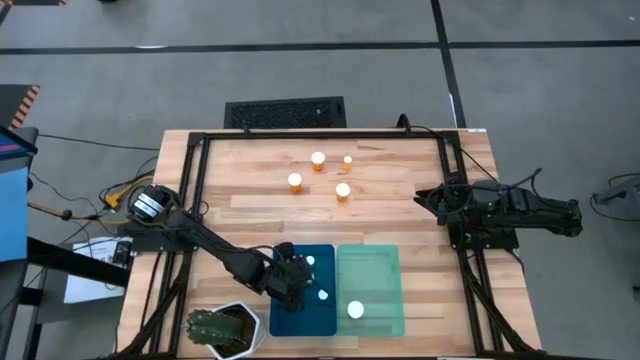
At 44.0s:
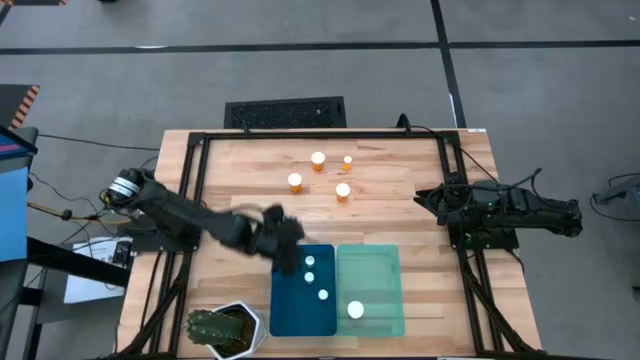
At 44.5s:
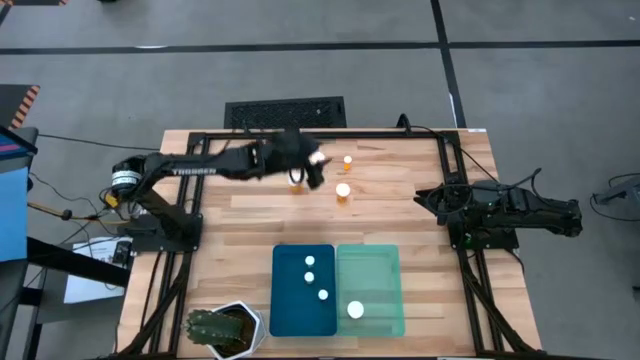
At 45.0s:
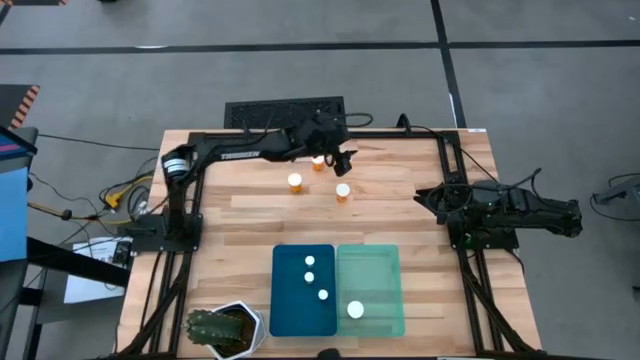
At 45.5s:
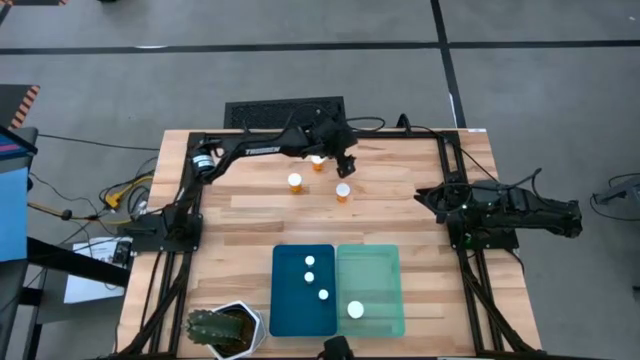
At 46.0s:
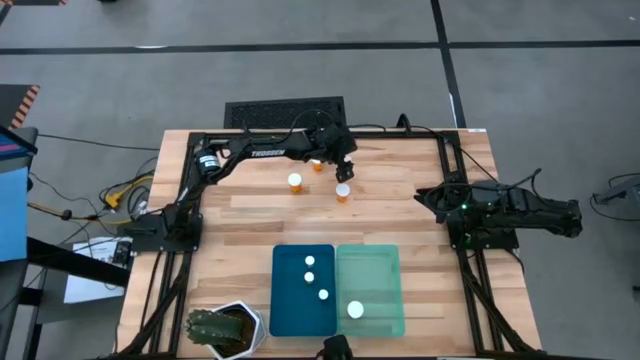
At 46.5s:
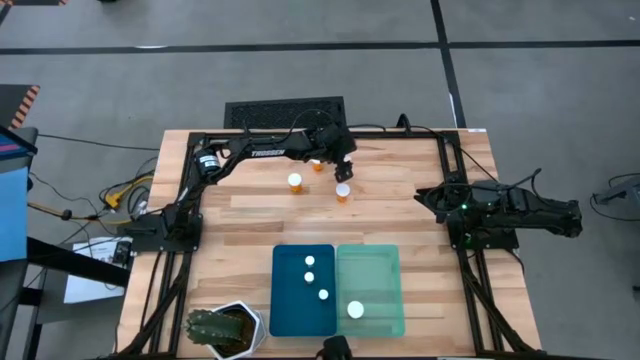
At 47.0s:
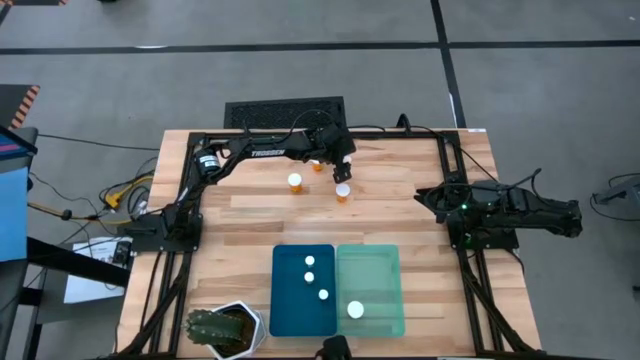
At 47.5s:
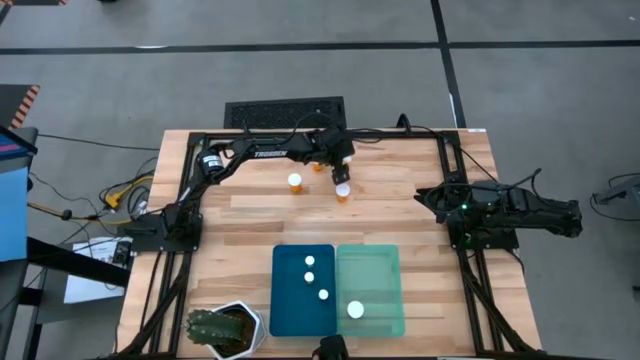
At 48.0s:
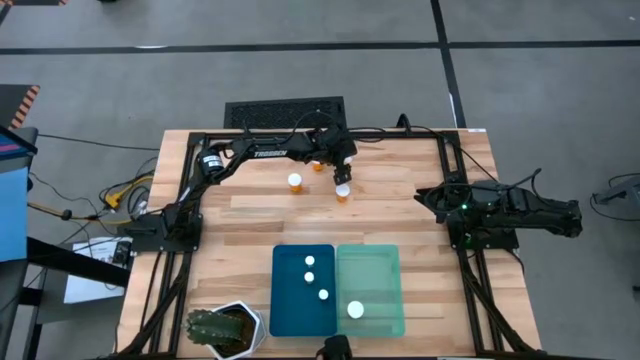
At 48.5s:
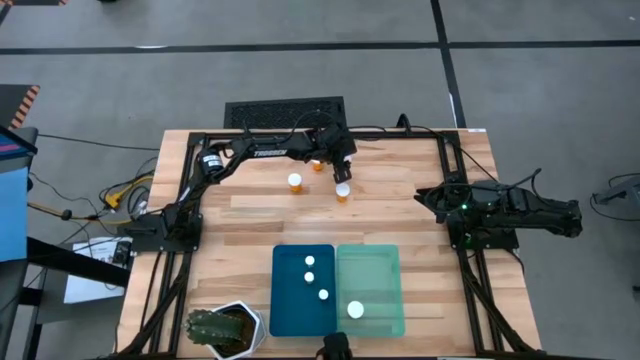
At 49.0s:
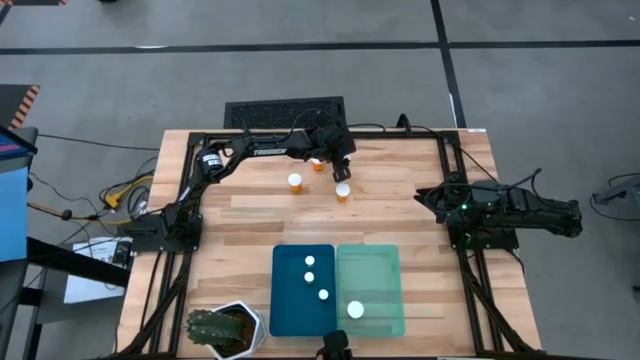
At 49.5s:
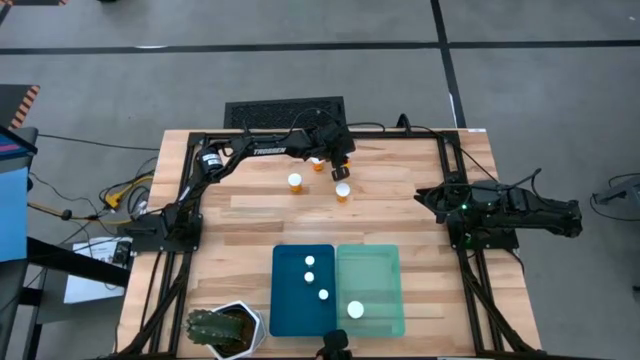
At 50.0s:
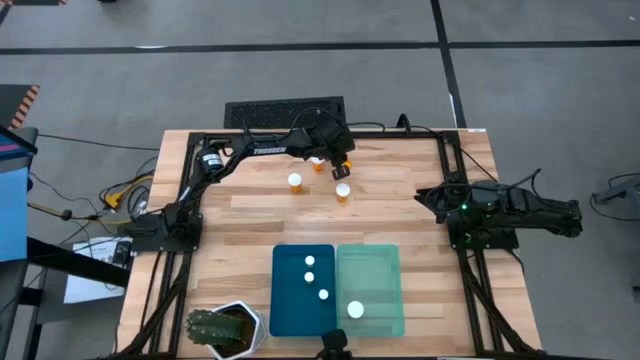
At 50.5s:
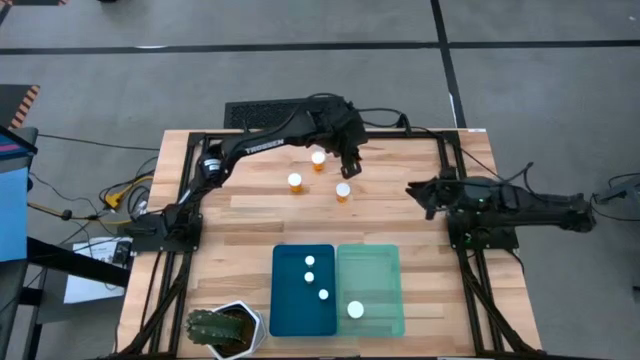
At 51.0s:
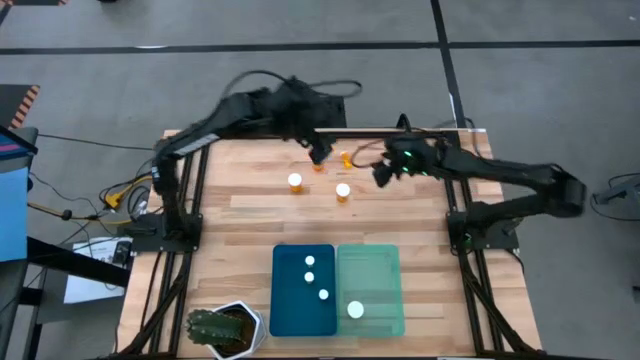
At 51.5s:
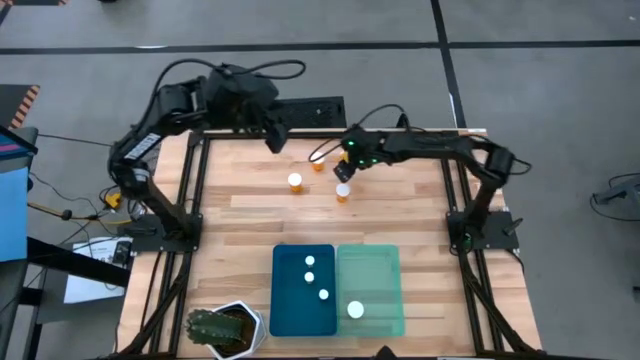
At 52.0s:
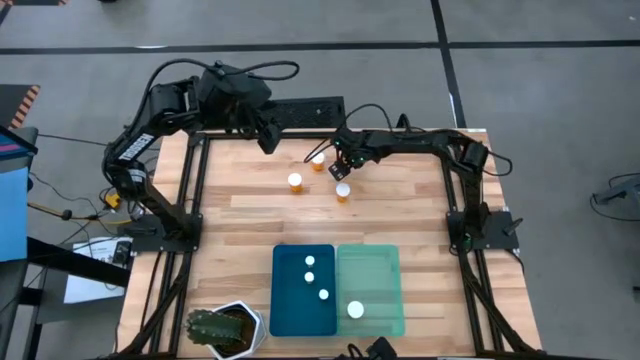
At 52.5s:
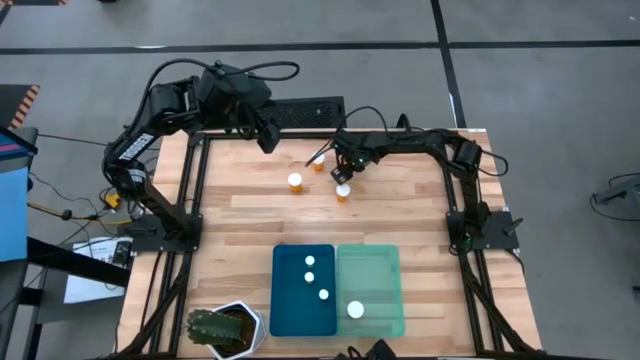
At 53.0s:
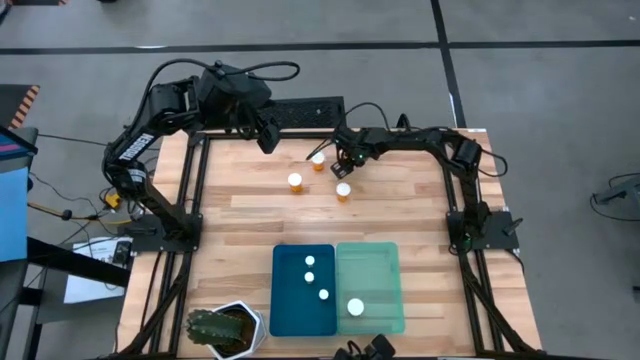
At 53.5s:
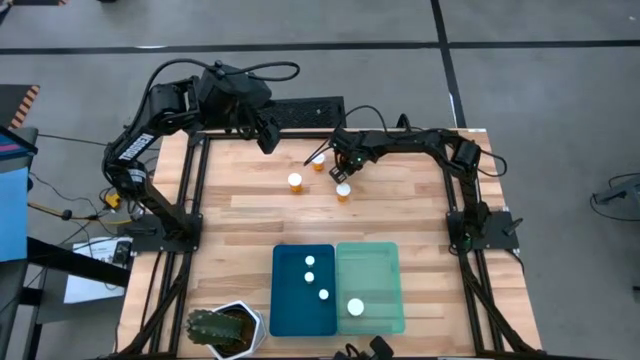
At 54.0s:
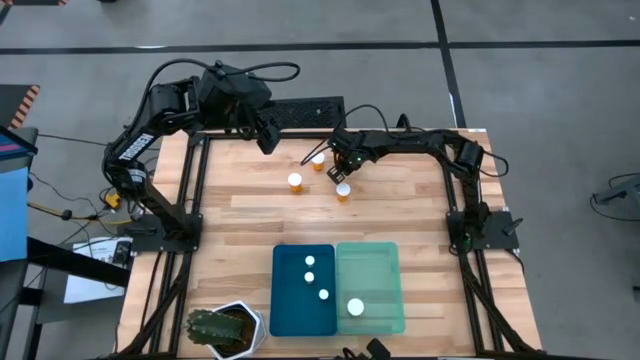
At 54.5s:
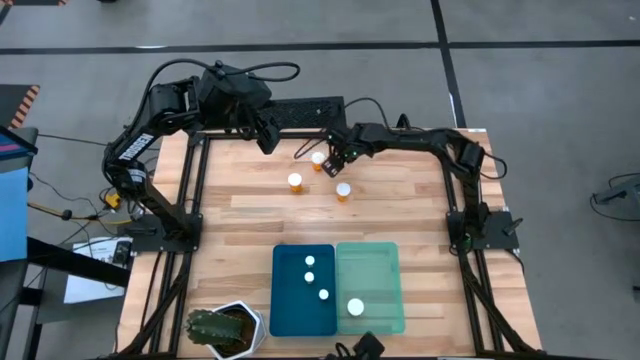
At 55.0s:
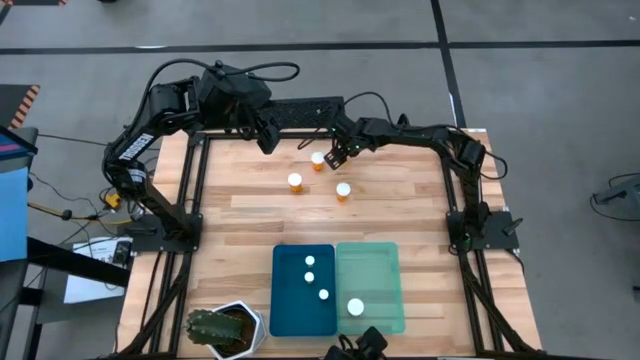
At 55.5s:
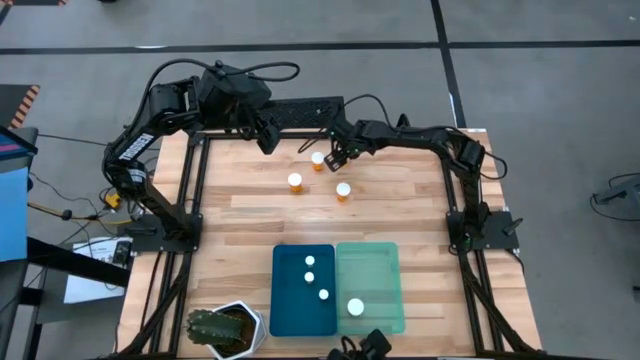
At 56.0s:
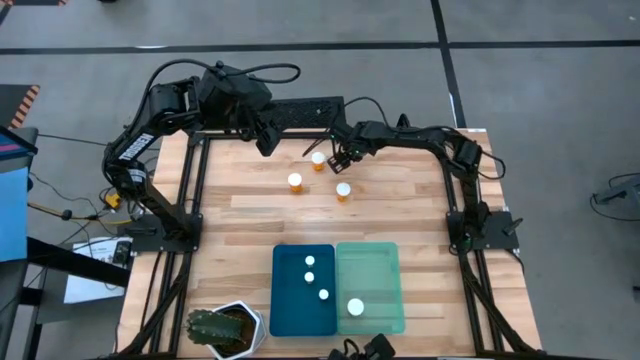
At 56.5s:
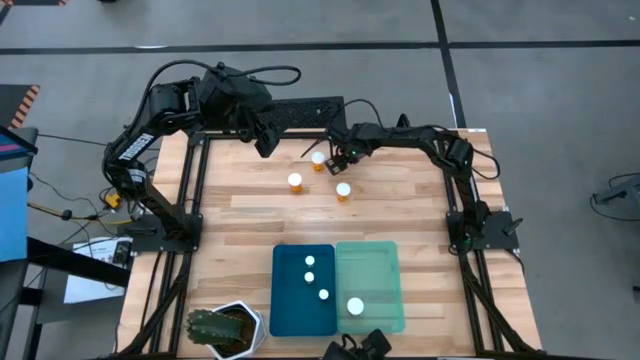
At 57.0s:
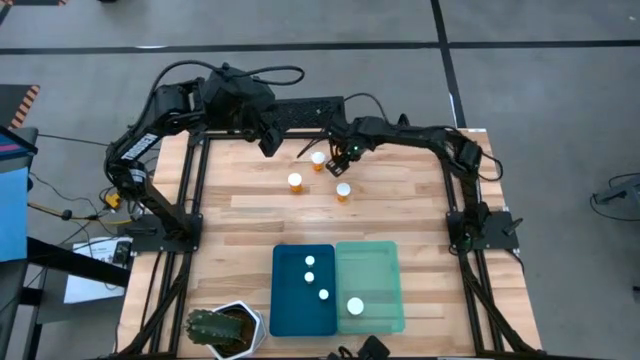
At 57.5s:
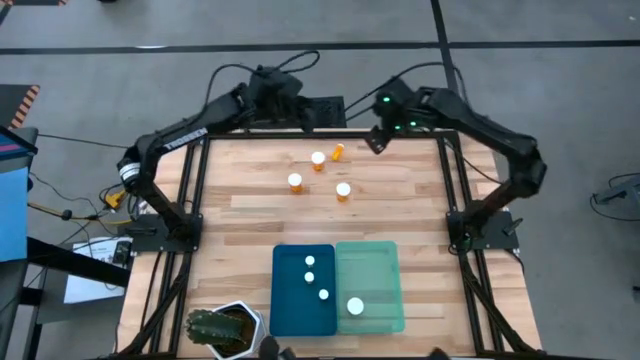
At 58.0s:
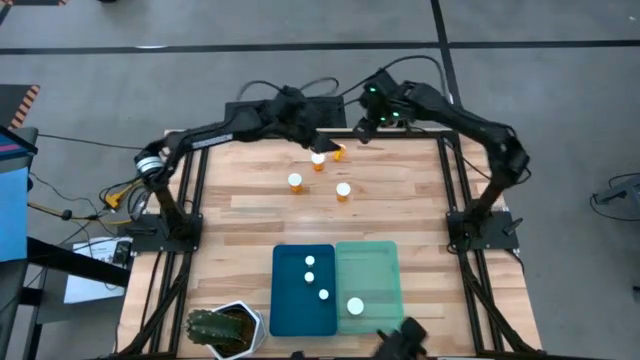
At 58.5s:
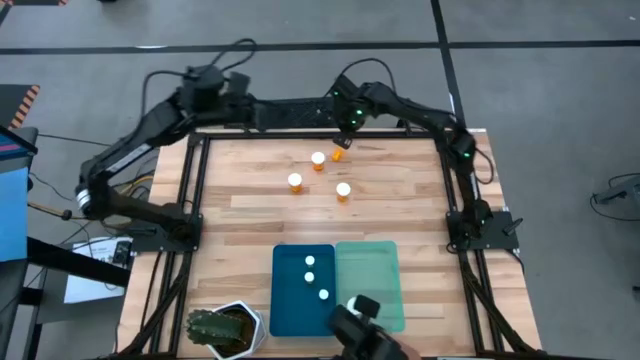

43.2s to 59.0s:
Task: Pick and place medicine bottles into bin by pill shape (circle, oval)
Put the small orange pill bottle into the blue bin

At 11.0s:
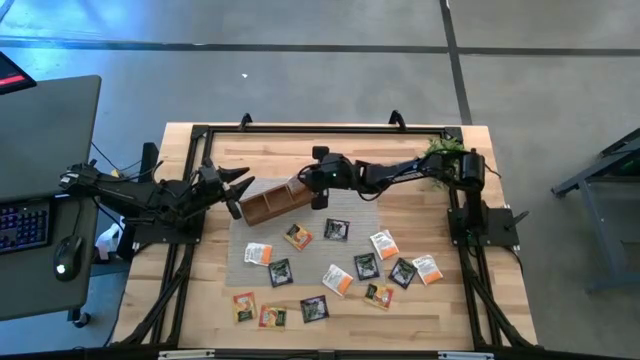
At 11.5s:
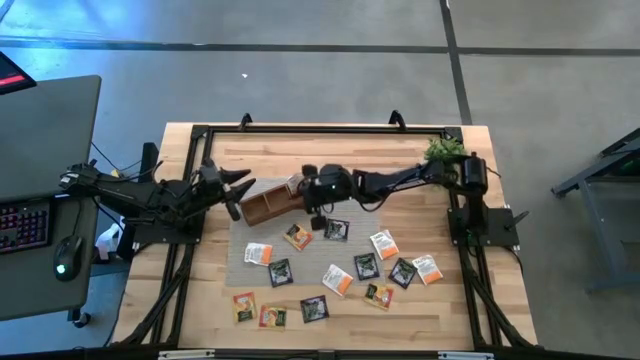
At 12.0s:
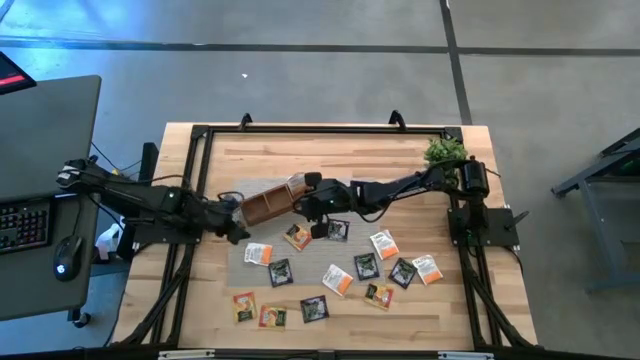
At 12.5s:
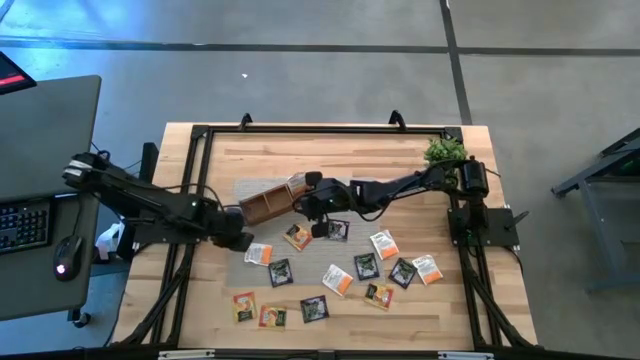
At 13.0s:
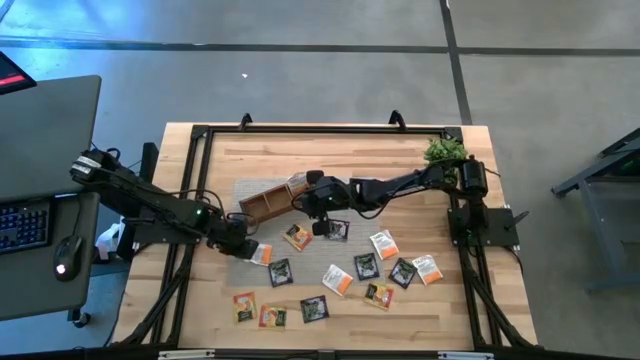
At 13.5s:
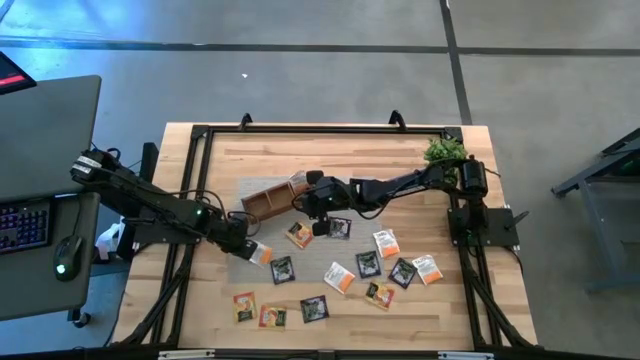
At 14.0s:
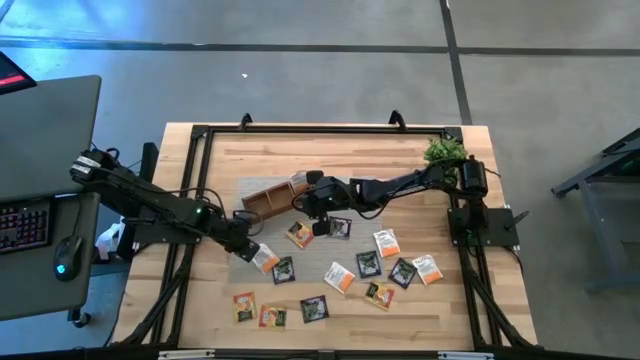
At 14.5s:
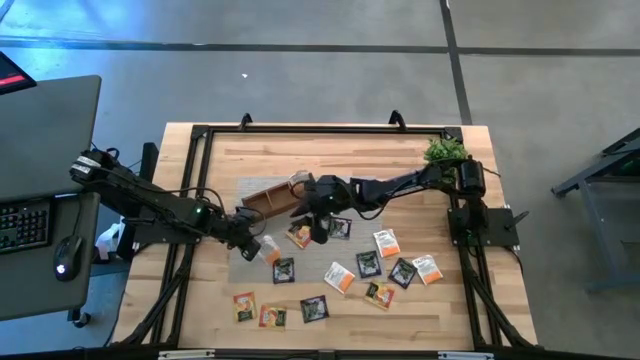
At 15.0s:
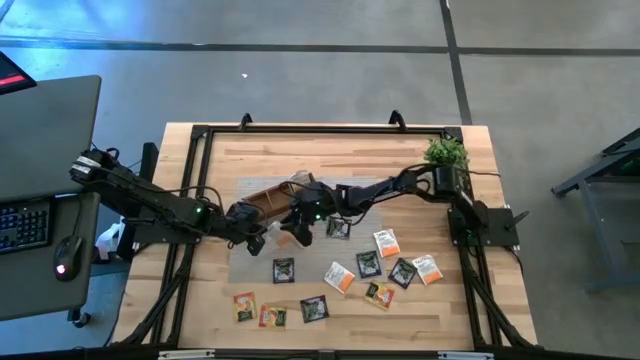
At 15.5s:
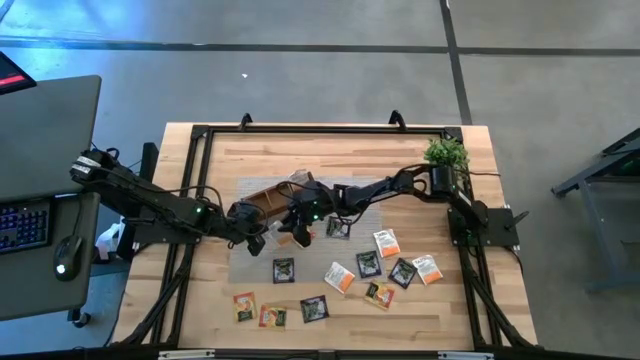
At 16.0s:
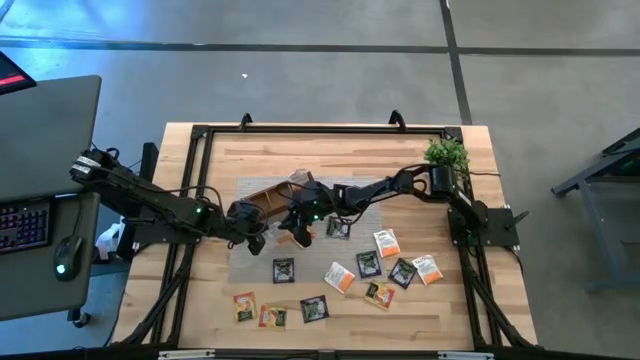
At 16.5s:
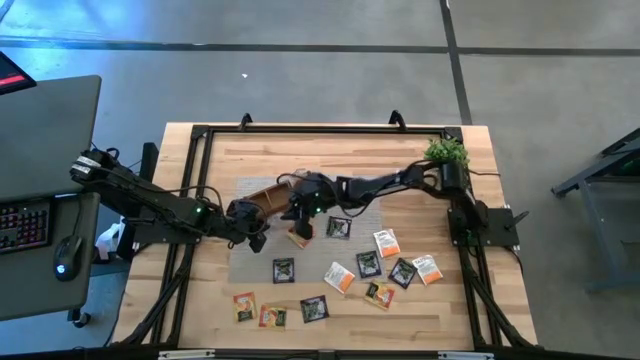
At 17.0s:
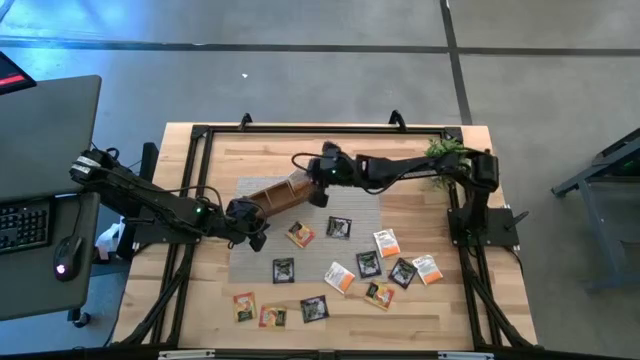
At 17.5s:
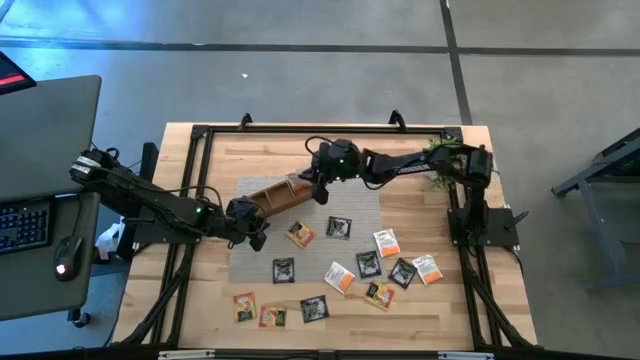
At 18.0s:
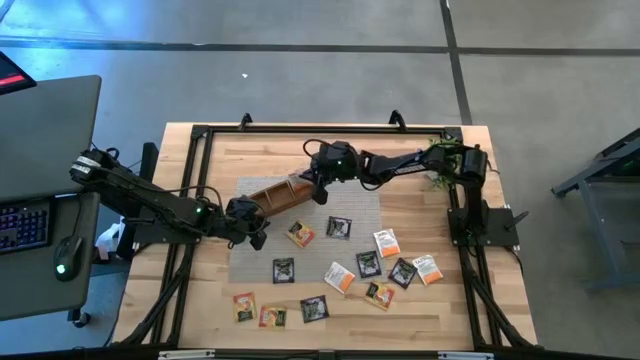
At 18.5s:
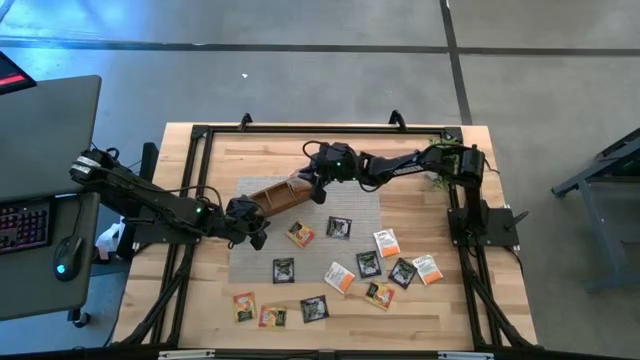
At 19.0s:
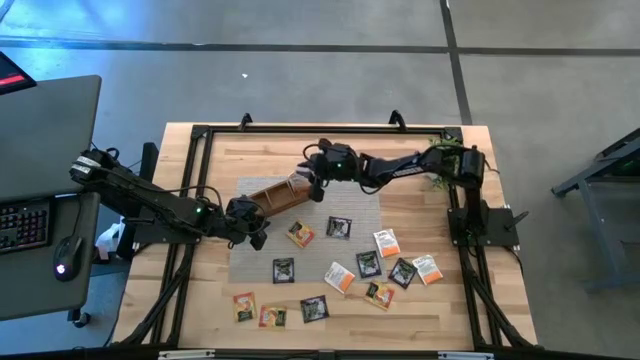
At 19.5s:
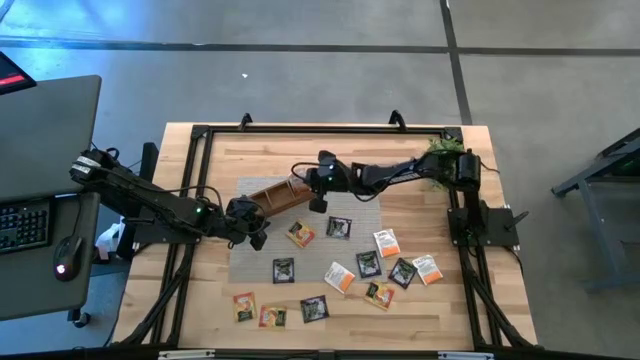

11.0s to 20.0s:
Task: Pick & Place Tea
Put the orange tea bag into the right section of the wooden organizer
